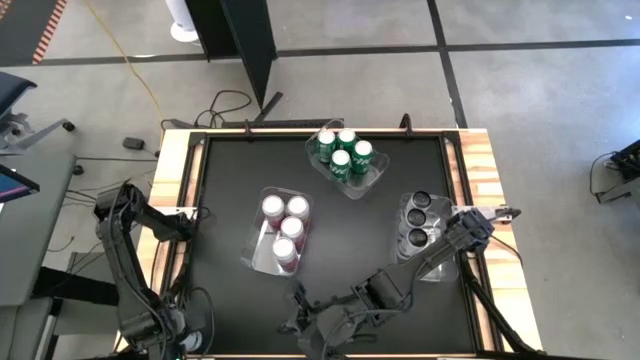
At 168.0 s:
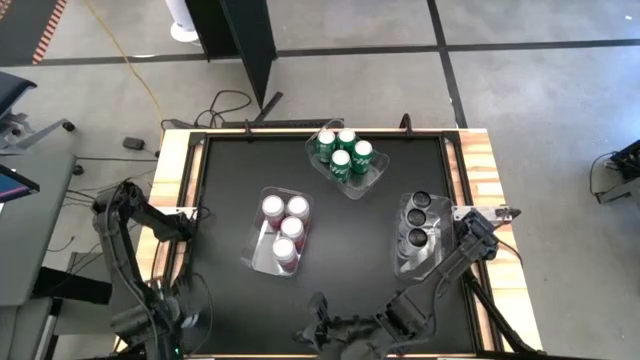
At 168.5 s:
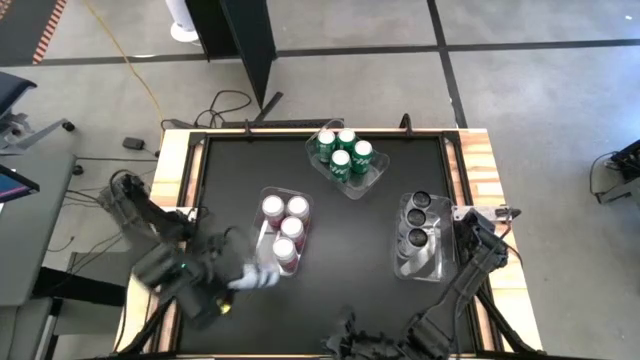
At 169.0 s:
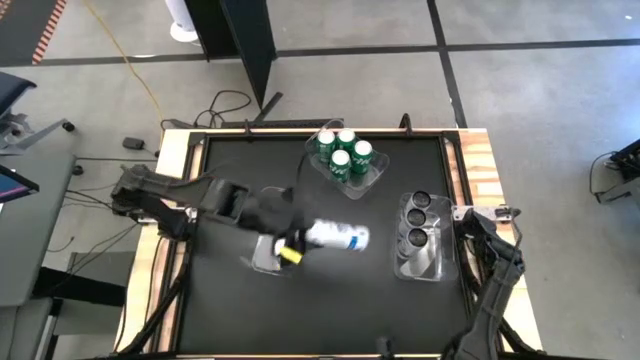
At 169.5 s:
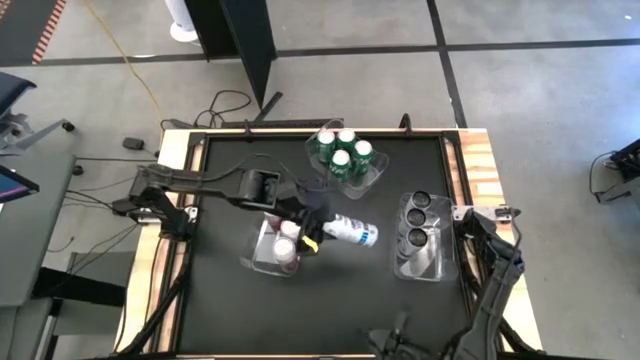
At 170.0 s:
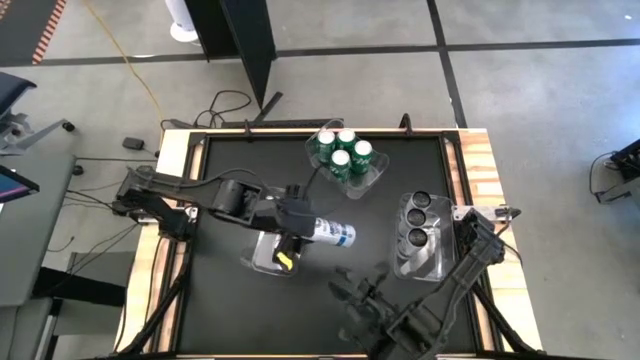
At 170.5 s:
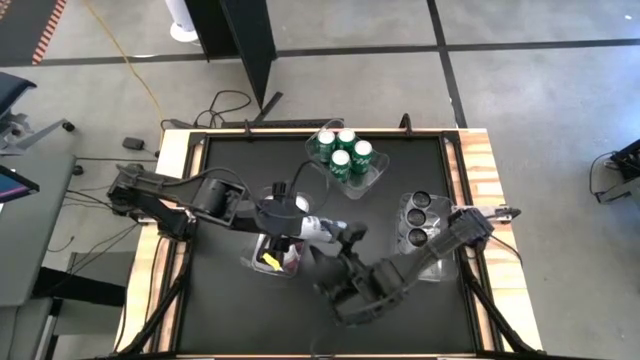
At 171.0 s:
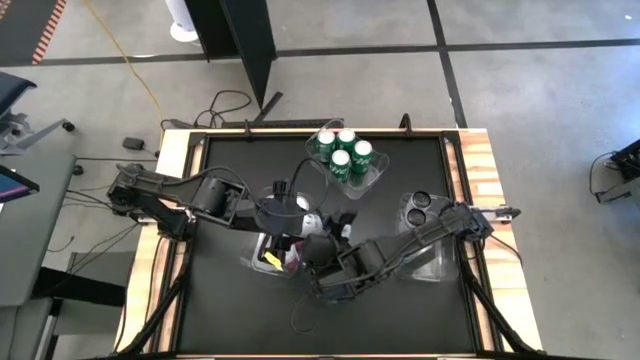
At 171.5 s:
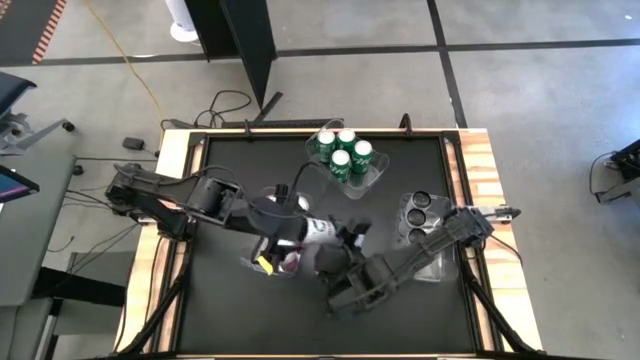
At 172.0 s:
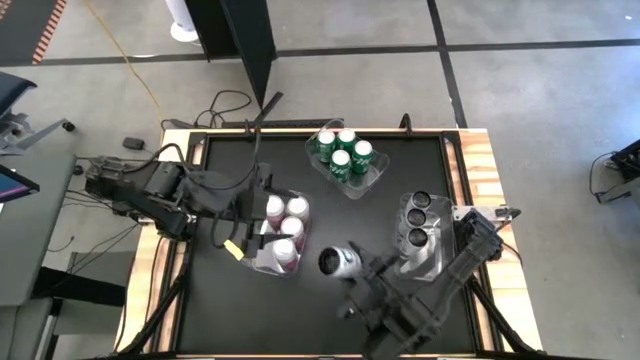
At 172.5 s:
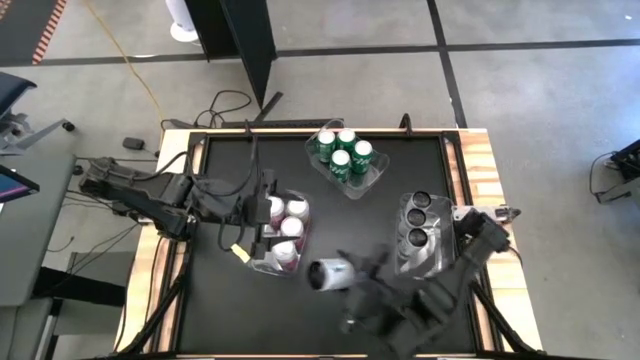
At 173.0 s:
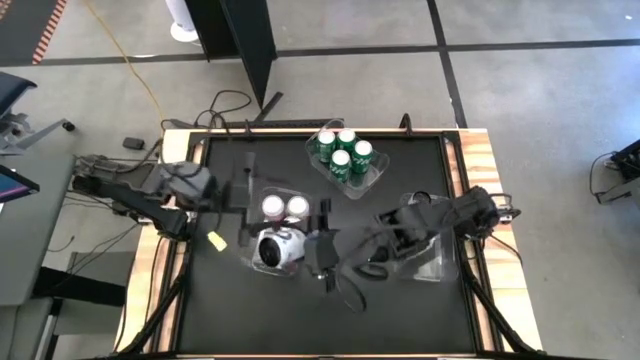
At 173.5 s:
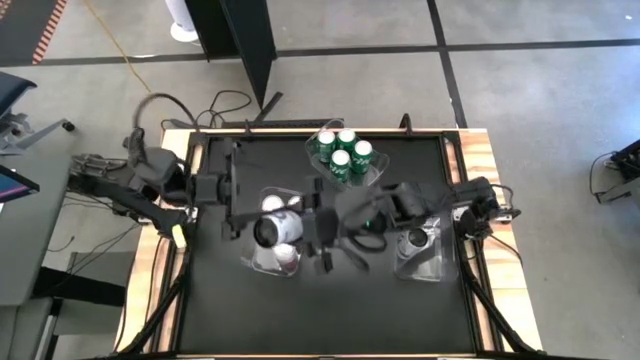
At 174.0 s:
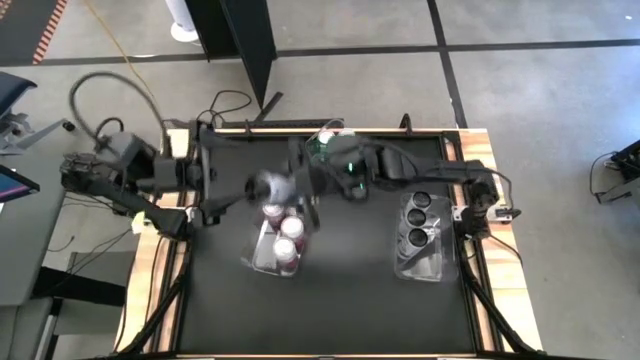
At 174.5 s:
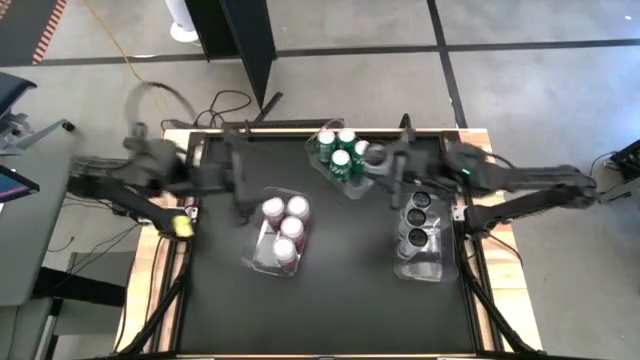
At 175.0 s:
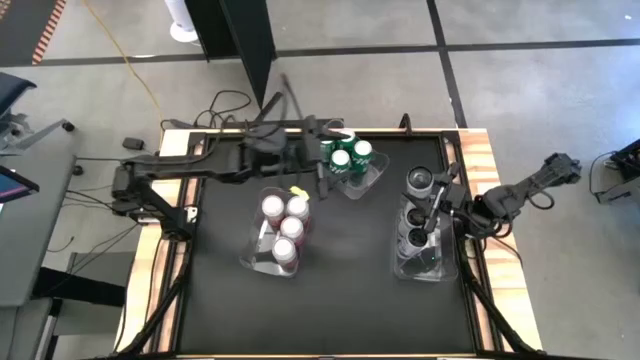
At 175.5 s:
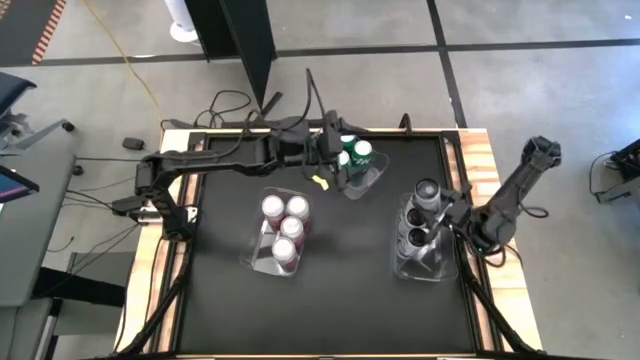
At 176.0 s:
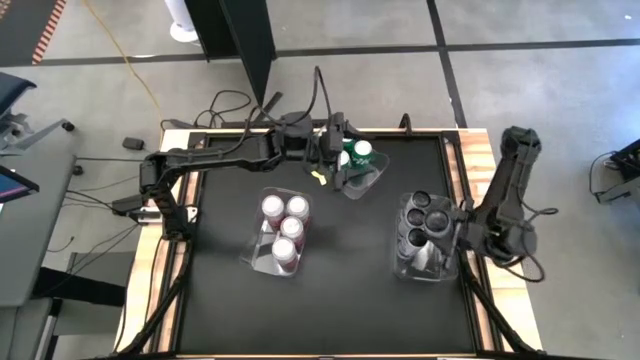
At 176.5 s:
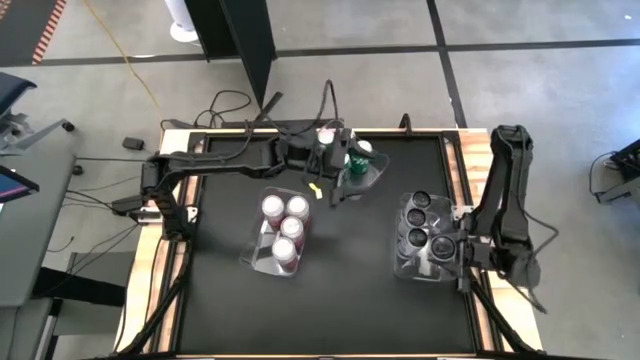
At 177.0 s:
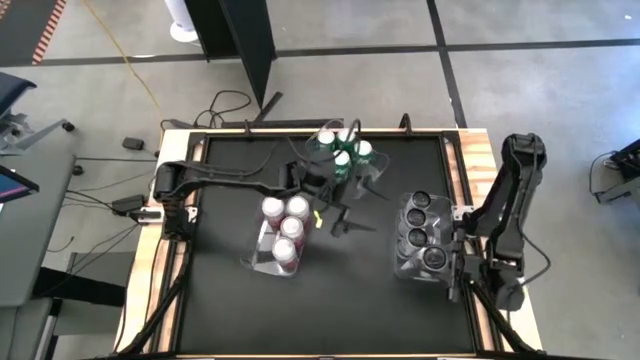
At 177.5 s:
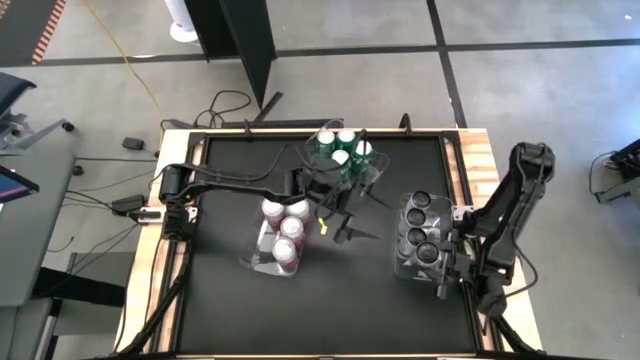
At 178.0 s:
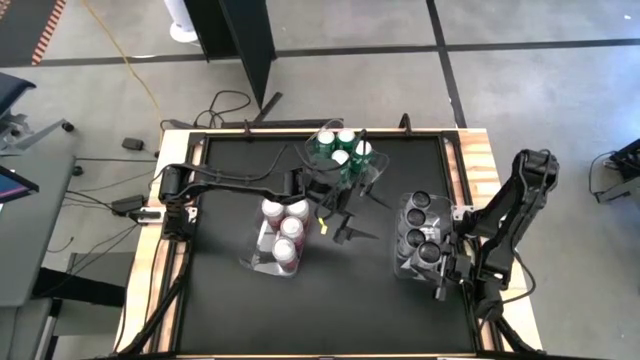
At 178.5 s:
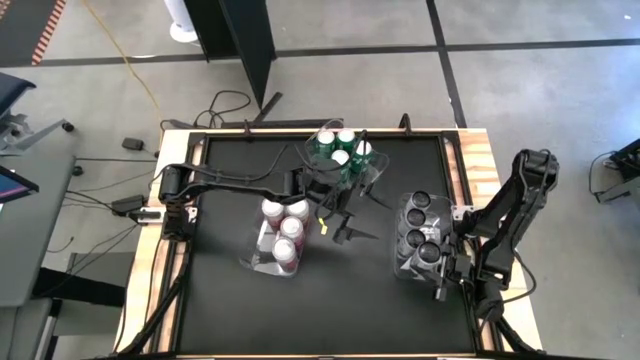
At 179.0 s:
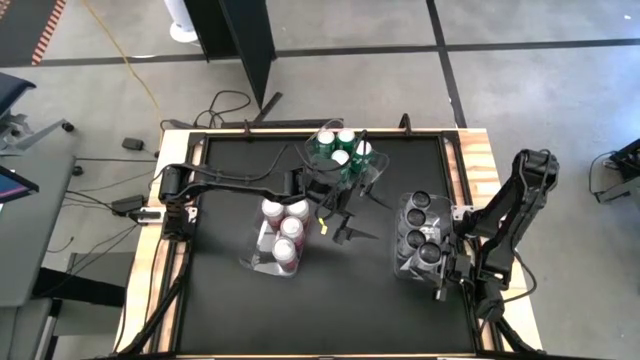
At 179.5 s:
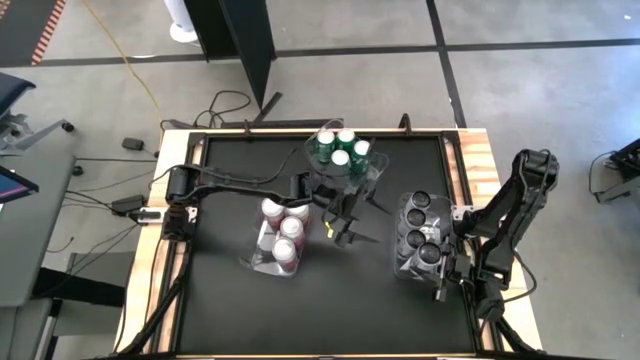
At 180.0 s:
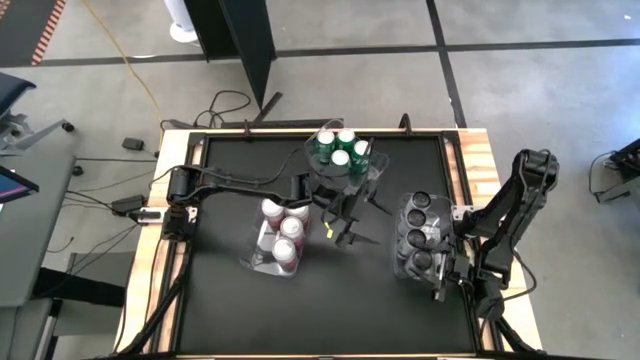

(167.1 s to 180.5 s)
Task: Sort soda cans
Put the white blue soda can into the right transparent bin

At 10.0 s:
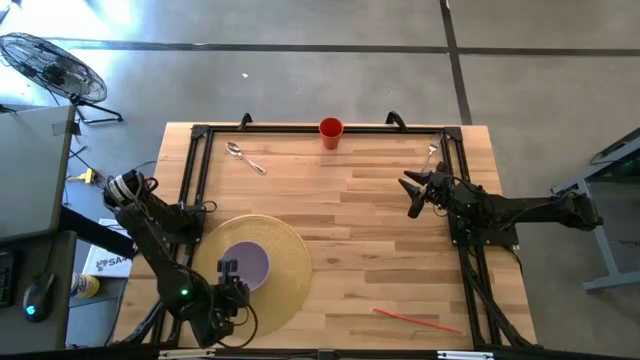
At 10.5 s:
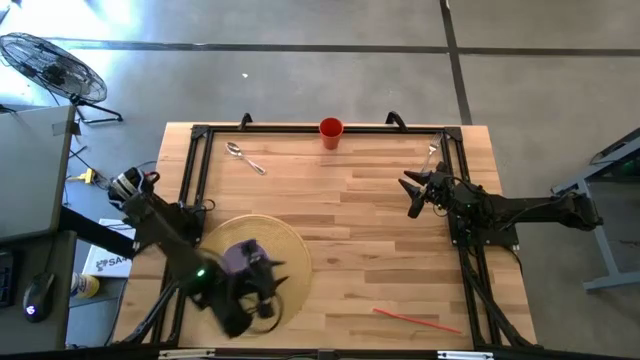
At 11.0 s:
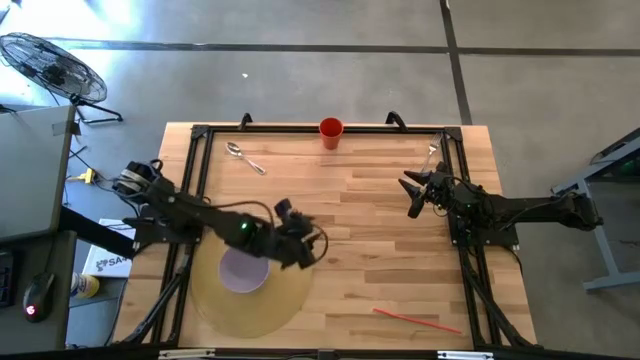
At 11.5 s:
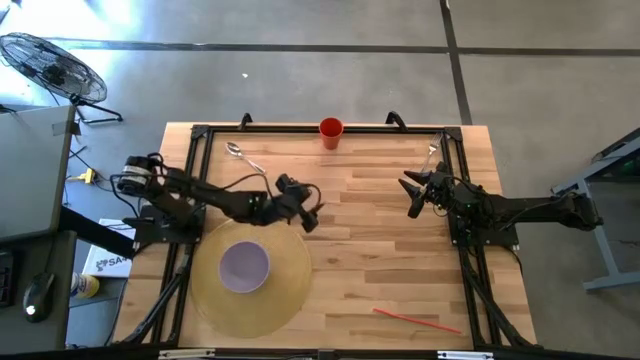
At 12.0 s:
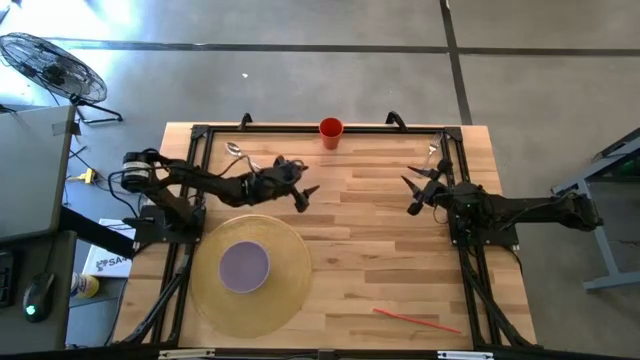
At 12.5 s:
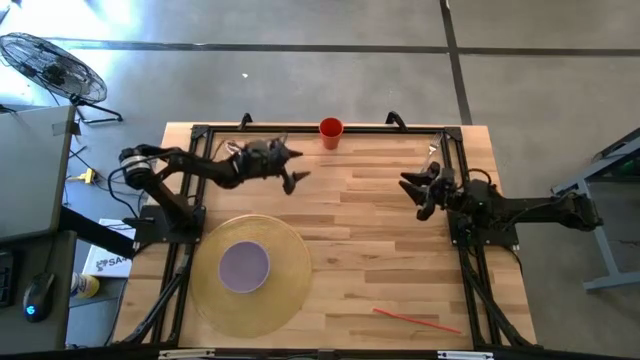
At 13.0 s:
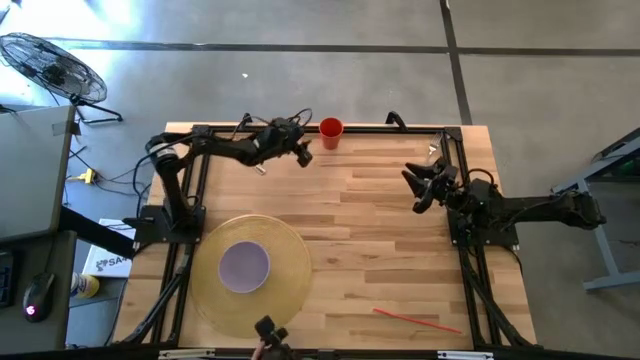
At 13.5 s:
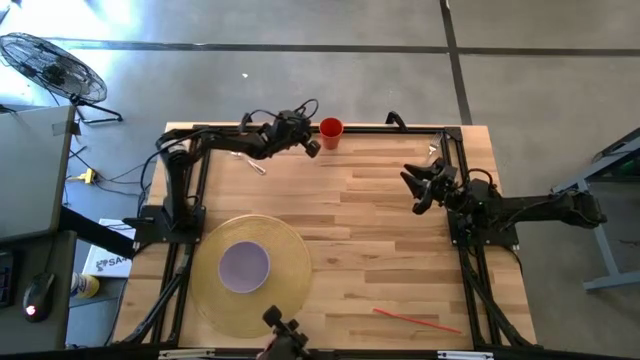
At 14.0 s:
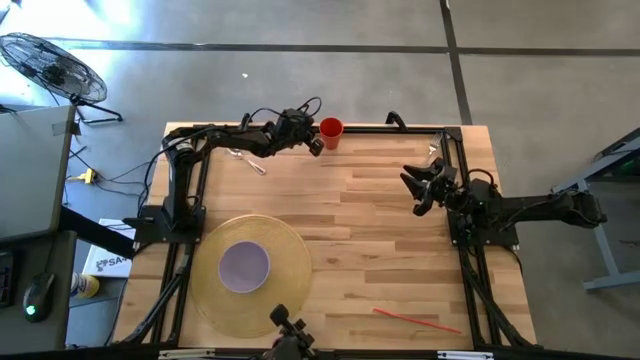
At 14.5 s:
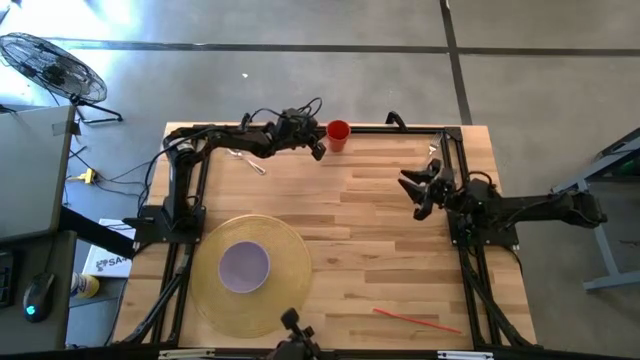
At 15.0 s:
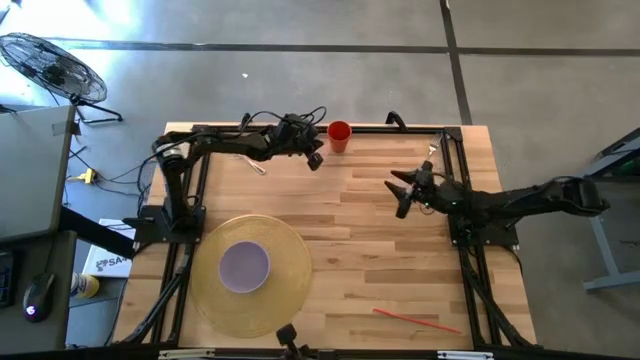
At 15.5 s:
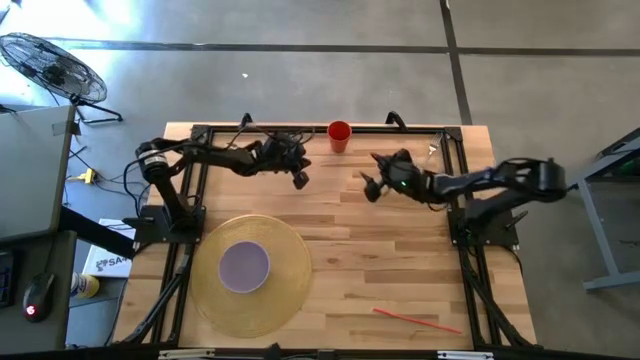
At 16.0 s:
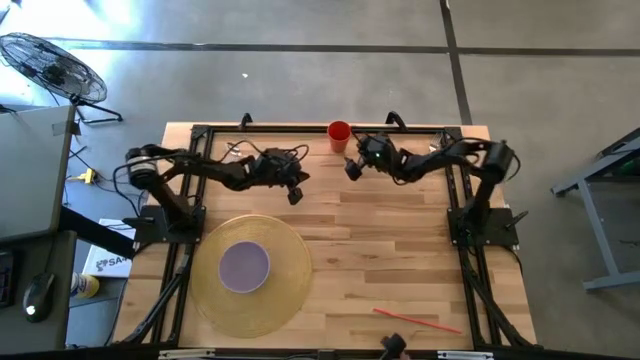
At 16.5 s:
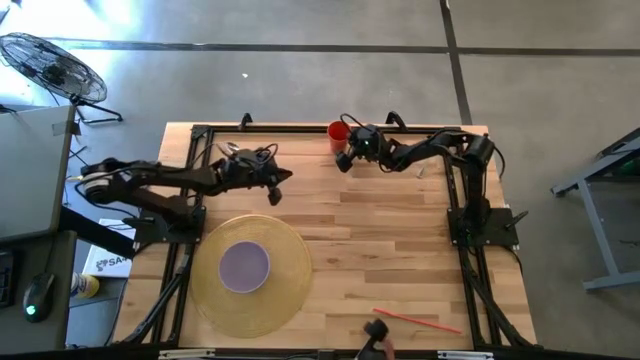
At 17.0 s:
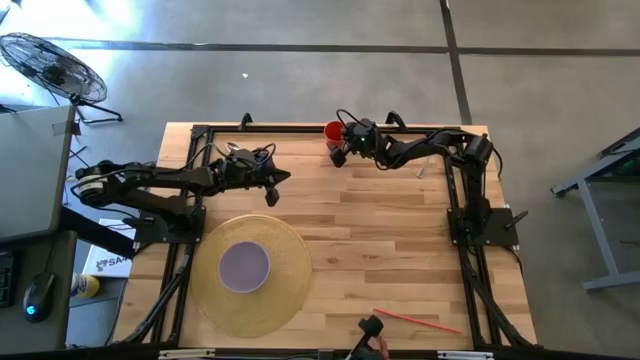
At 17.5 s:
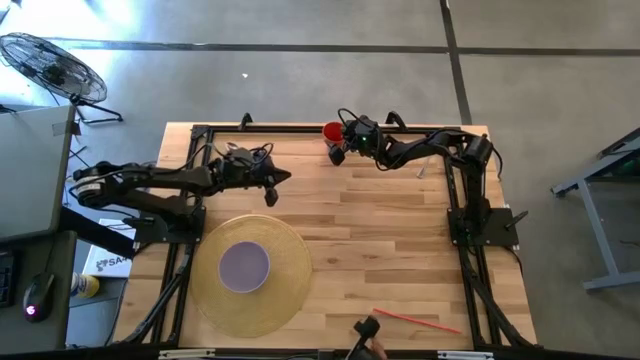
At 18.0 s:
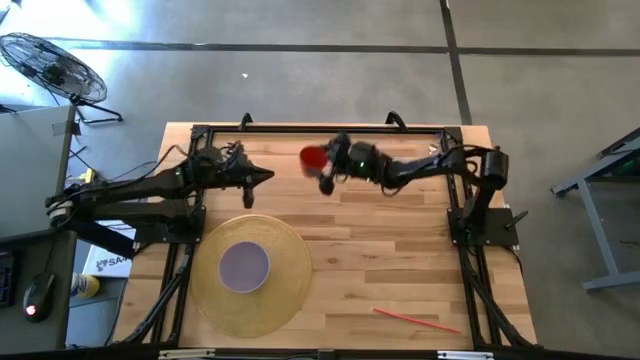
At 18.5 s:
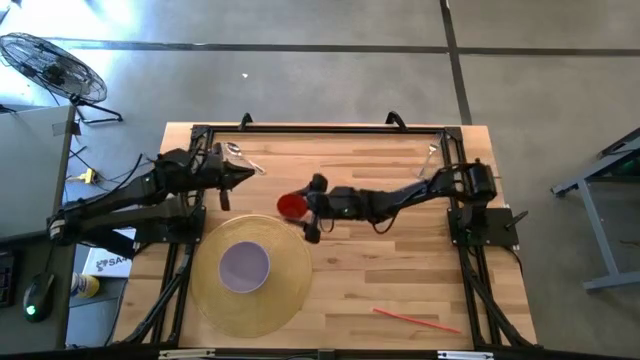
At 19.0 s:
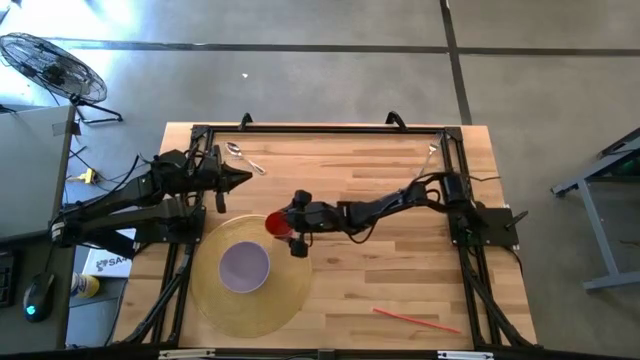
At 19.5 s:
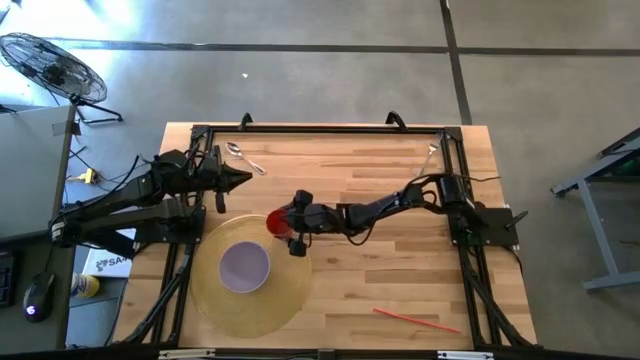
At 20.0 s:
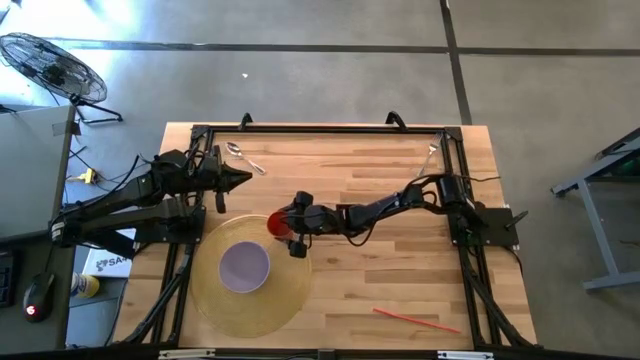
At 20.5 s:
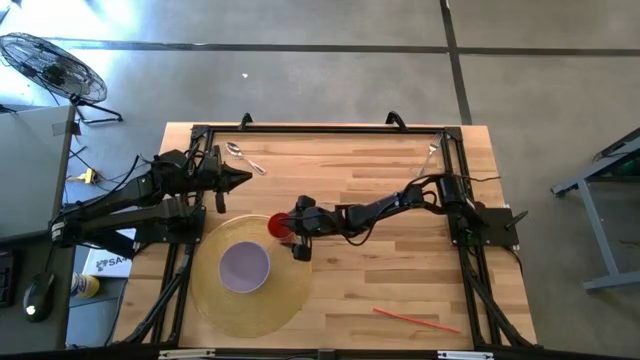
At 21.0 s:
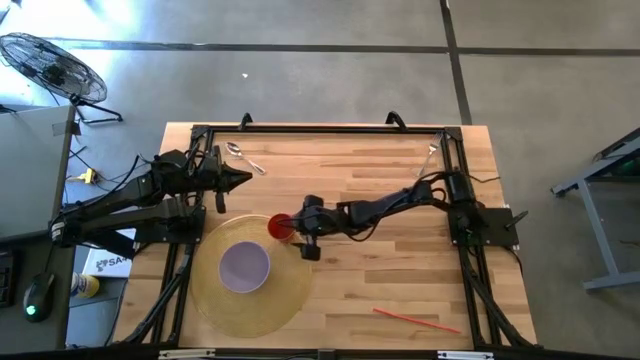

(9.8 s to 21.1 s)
Task: Pick & Place Utensil
Put the orange cup to the top right of the purple bowl on the brown mat
